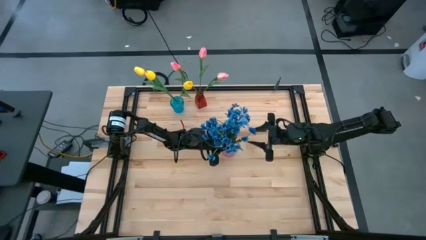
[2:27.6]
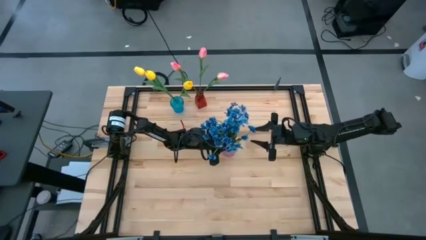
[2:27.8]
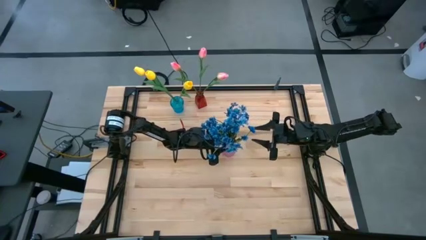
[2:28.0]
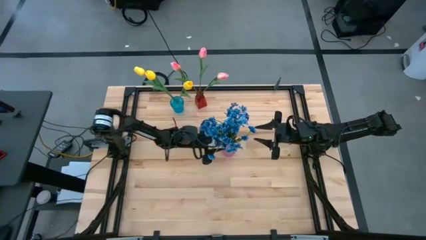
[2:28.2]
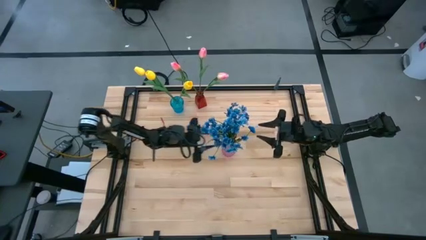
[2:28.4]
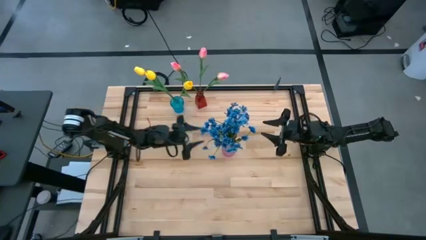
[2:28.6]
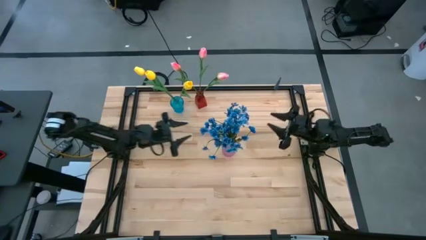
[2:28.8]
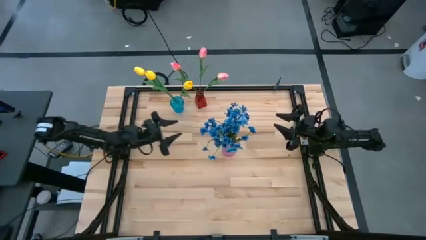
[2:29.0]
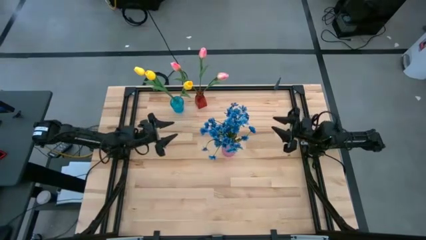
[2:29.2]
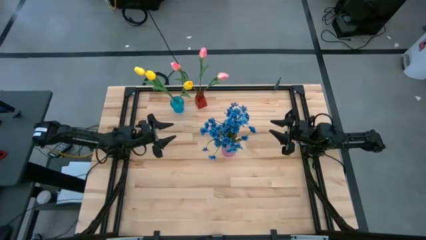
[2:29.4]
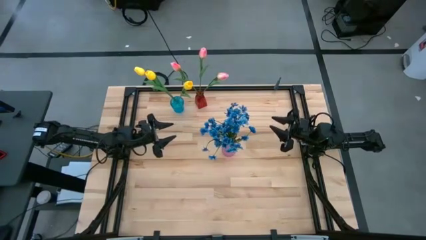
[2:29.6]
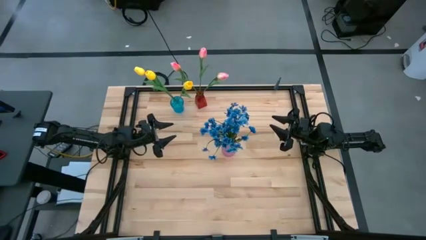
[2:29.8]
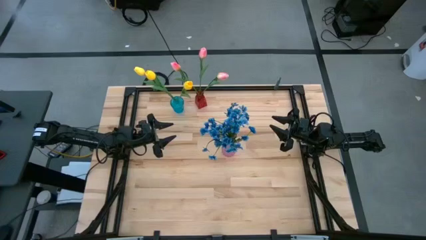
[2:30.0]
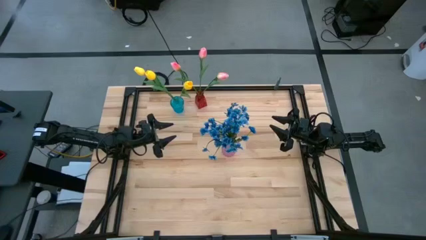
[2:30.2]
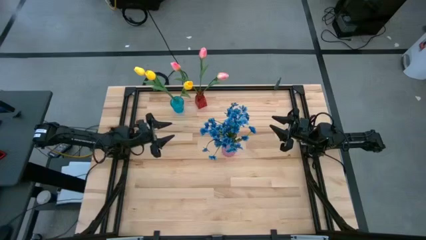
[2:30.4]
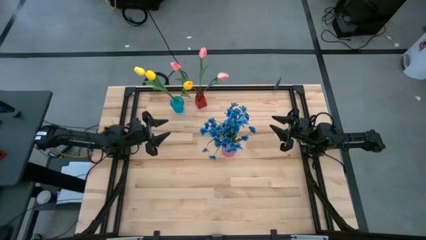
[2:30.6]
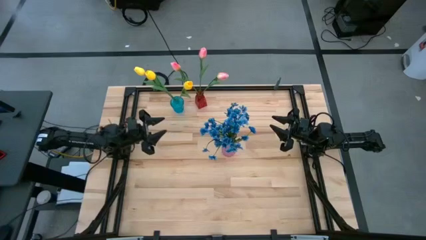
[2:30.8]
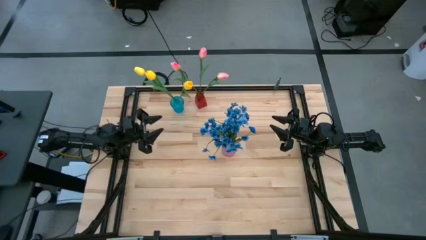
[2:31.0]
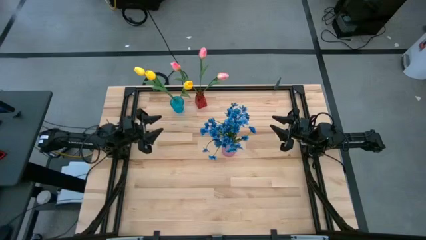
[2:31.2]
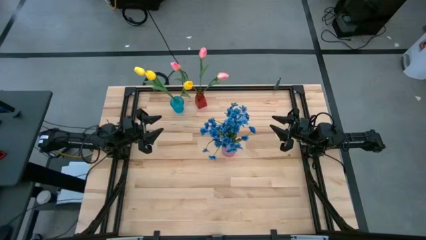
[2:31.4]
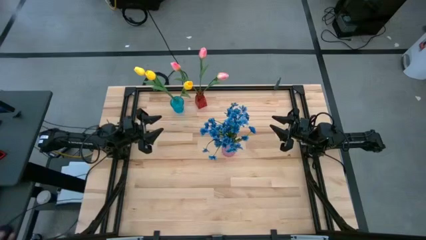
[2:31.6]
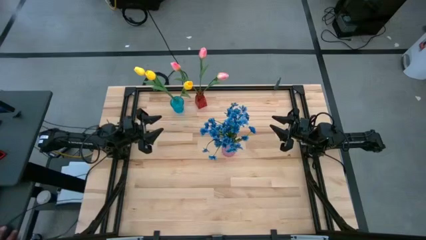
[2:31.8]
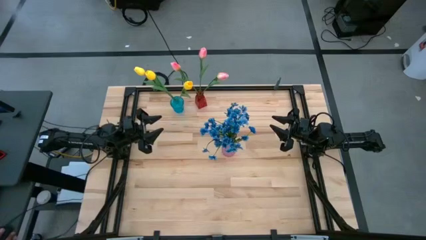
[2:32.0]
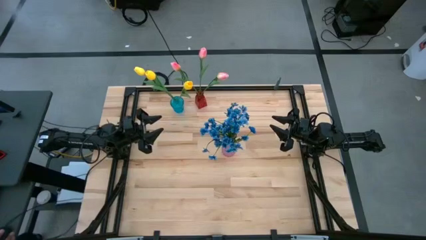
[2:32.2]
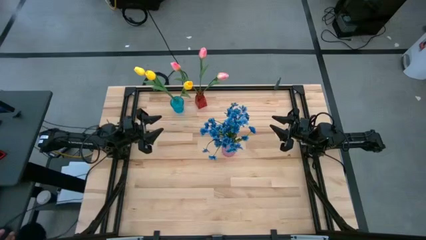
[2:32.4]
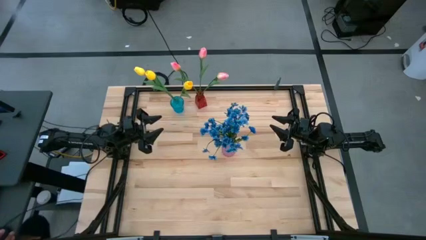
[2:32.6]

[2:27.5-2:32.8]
Task: Sort flowers into vase by color
Return to Home Position

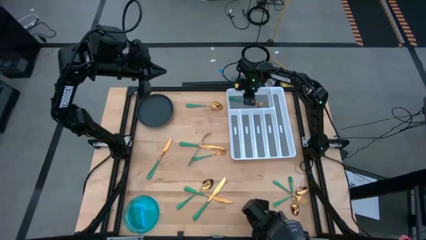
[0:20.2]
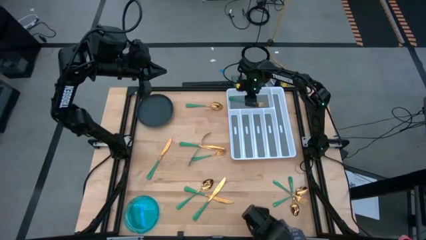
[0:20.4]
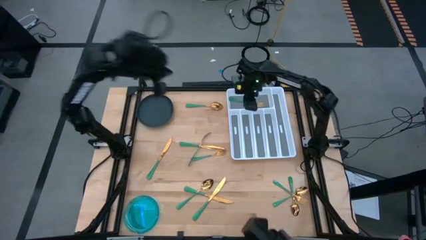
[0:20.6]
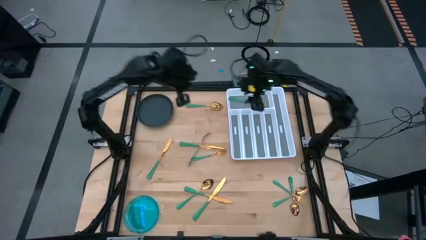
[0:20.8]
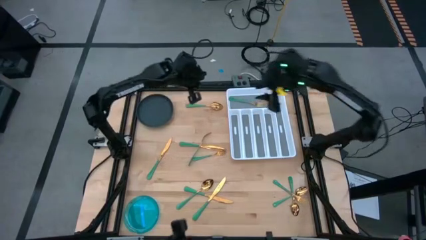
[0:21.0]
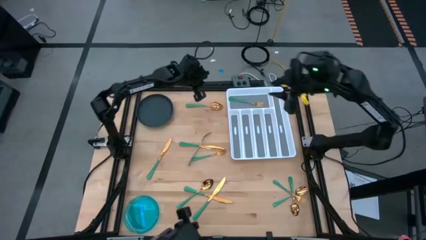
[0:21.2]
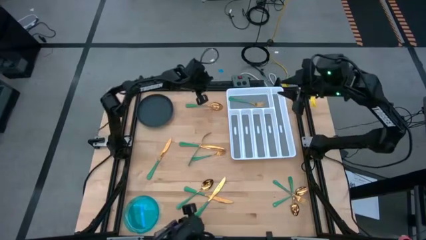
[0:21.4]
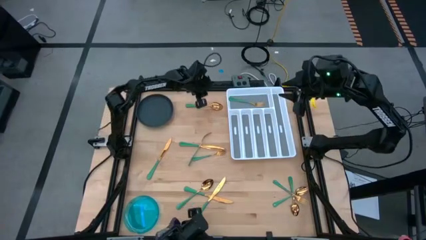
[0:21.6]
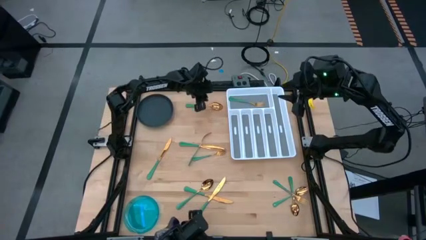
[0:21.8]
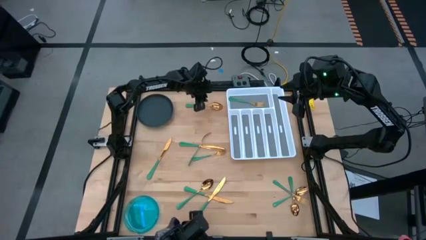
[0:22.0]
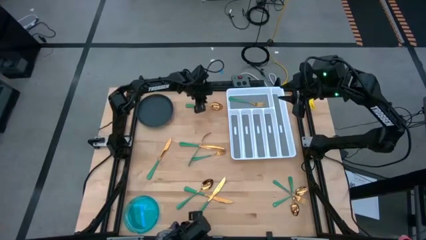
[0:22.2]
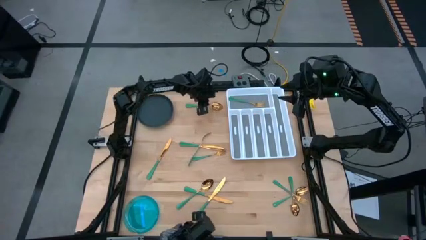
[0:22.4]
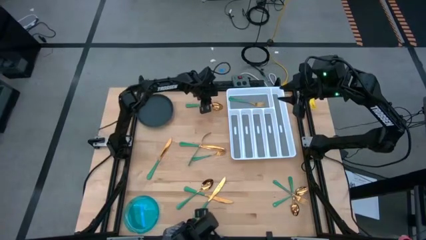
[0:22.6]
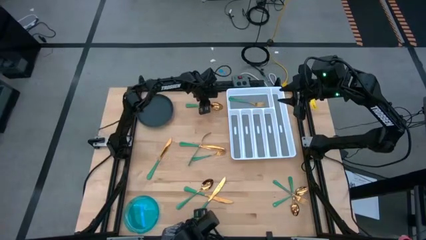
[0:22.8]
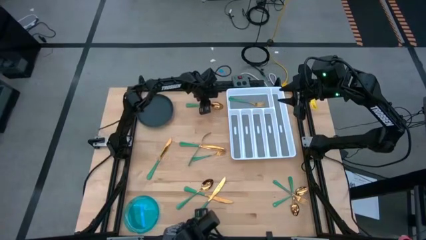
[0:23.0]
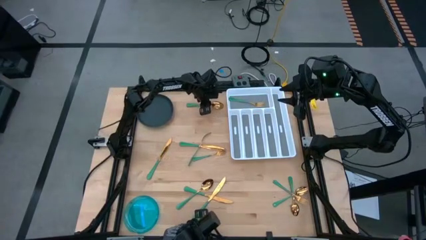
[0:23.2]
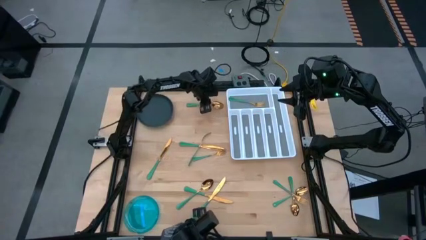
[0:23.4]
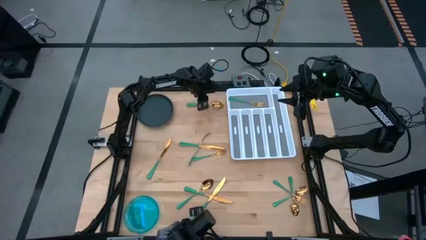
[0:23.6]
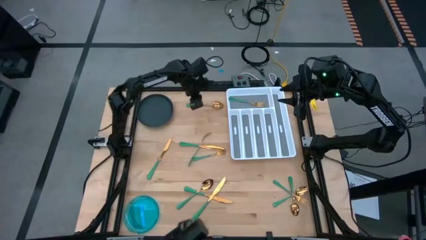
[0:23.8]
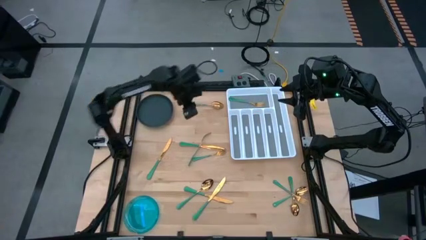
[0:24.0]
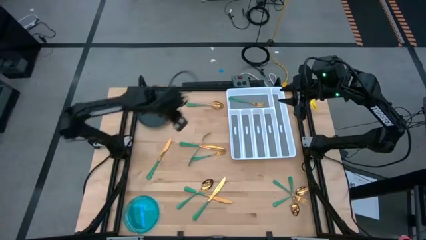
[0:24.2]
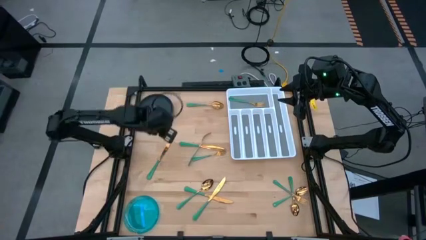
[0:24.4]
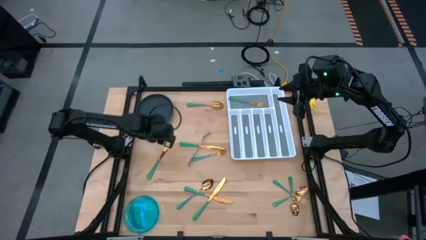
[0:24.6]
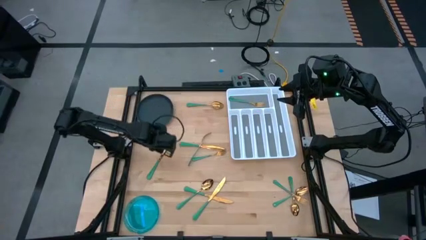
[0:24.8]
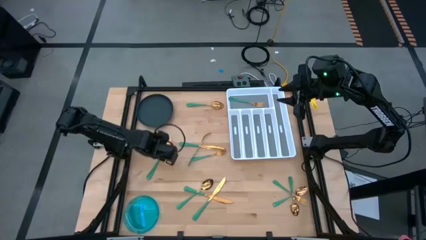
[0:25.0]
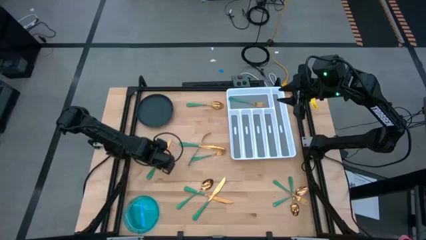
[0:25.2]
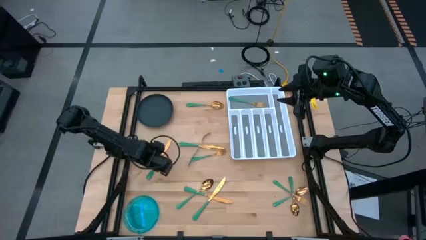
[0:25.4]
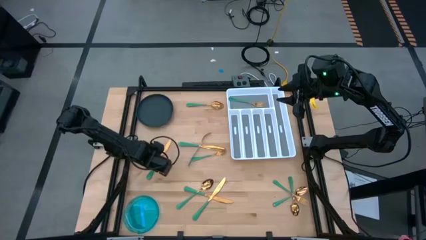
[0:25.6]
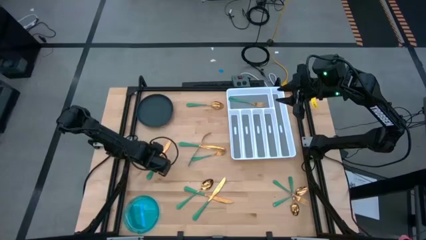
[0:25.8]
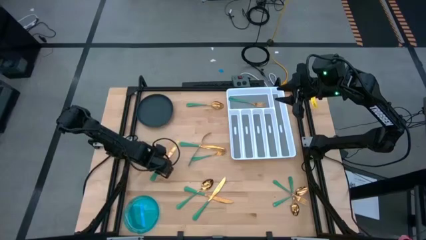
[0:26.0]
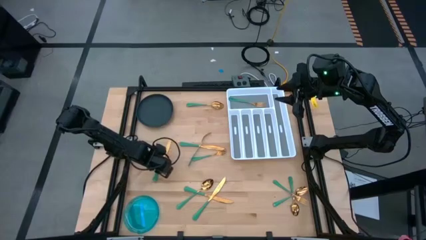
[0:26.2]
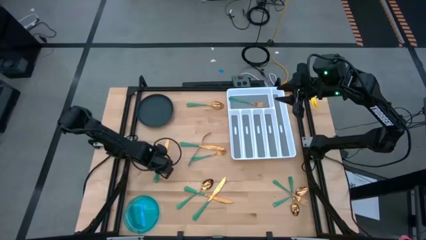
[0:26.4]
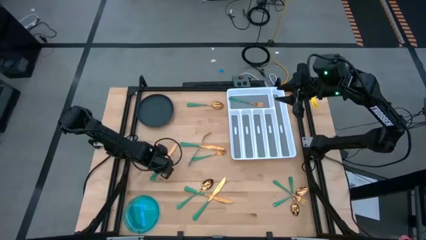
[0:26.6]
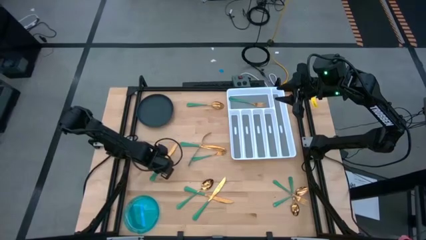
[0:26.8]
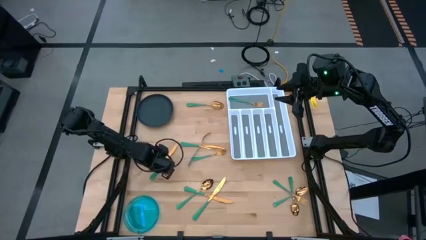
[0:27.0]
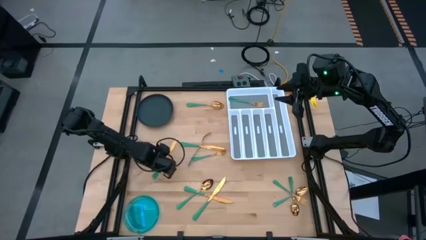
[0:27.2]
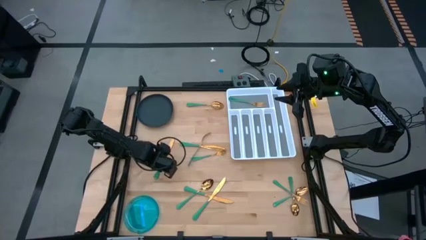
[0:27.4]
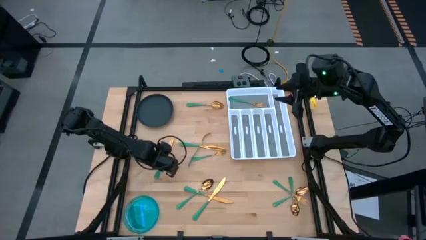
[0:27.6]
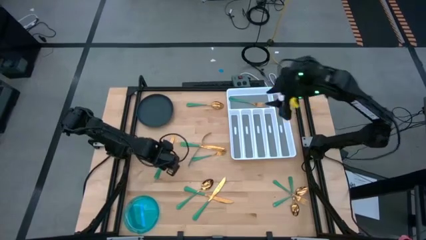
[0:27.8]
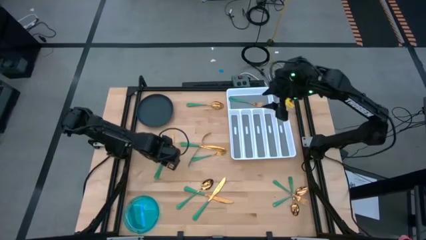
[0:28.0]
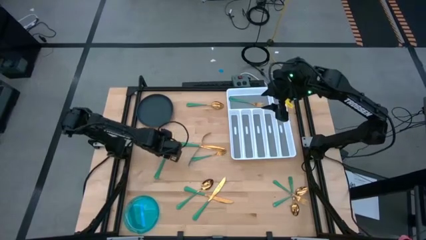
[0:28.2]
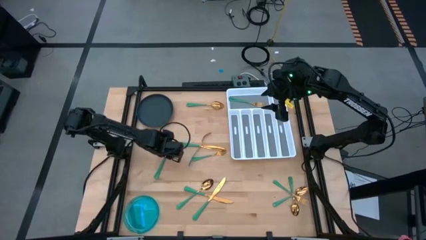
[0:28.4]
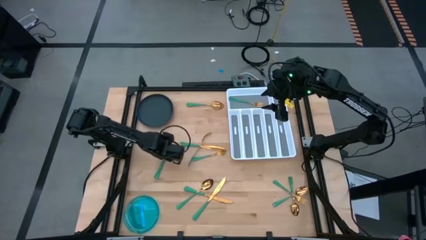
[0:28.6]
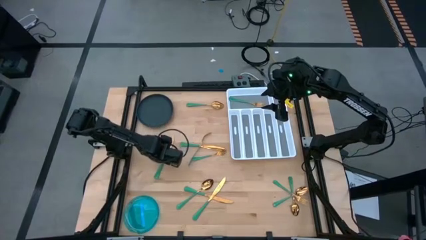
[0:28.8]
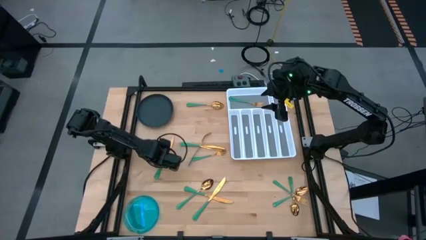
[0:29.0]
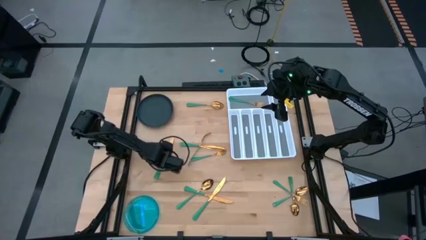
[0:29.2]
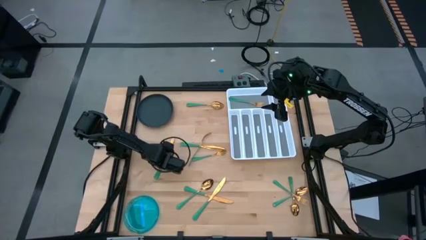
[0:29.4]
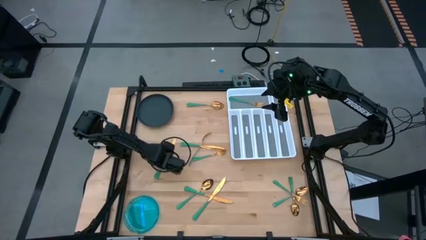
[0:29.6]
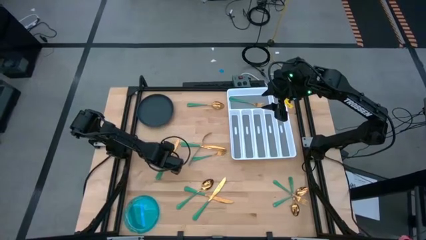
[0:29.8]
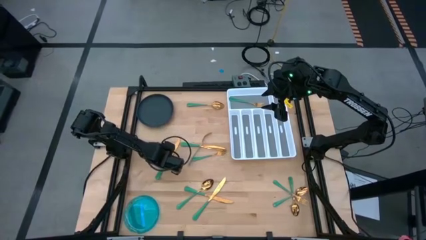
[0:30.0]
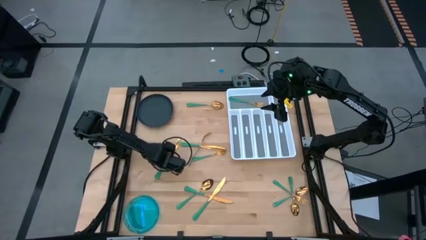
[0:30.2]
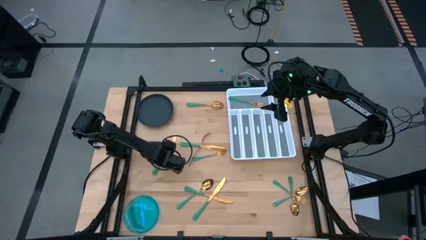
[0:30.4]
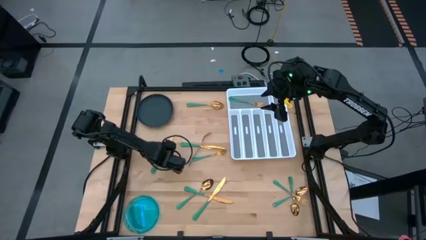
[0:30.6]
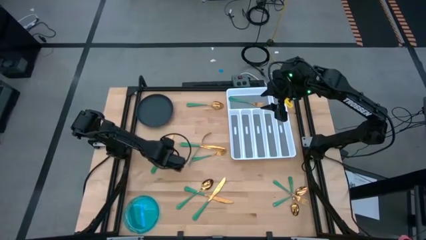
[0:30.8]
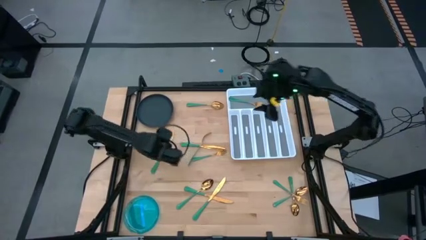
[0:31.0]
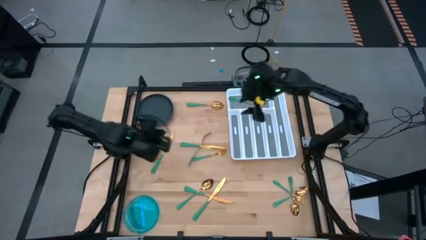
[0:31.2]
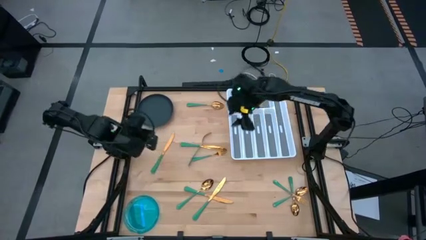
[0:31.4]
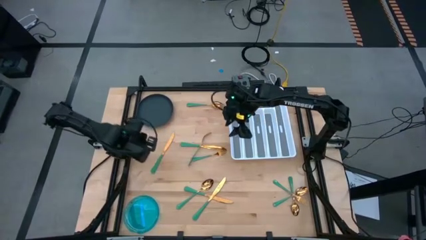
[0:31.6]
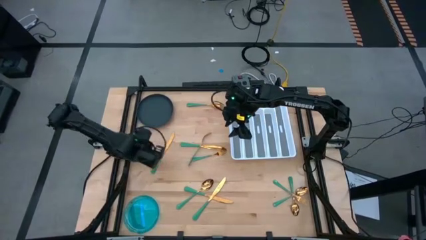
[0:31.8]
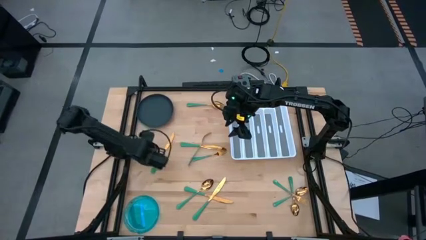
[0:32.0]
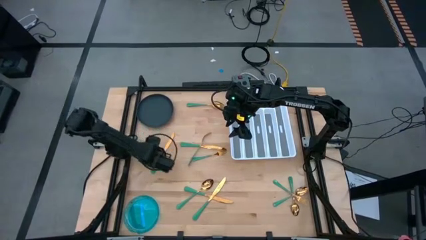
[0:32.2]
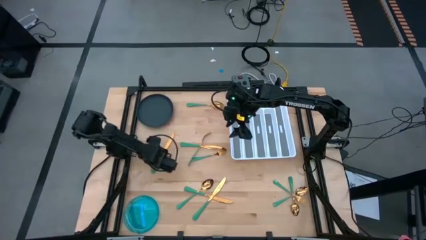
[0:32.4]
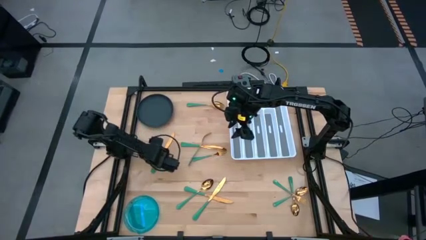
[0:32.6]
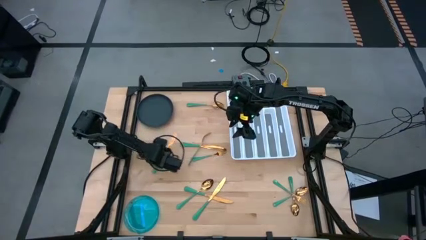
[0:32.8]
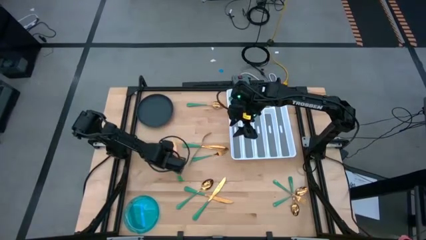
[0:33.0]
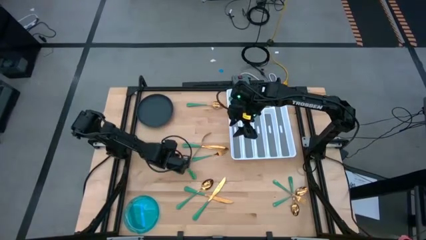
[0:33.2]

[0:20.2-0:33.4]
Task: Sort silverware
Put the green knife into the silverware tray
